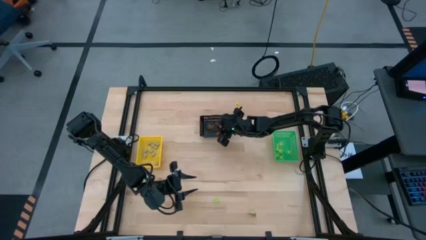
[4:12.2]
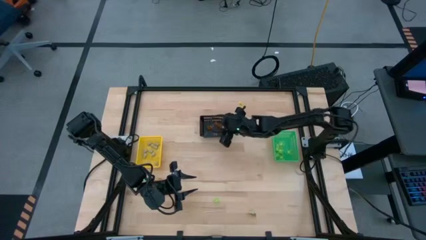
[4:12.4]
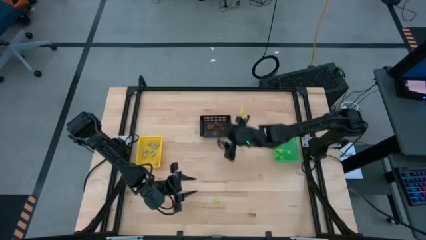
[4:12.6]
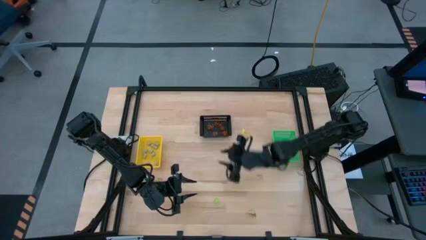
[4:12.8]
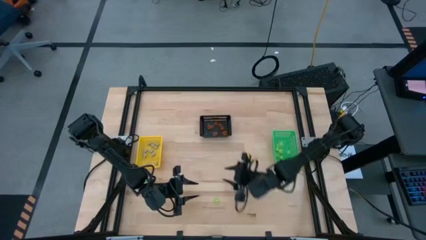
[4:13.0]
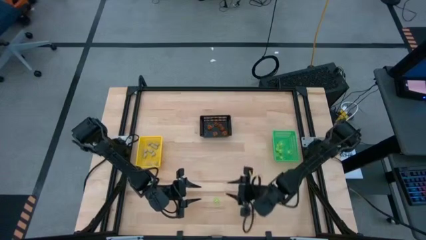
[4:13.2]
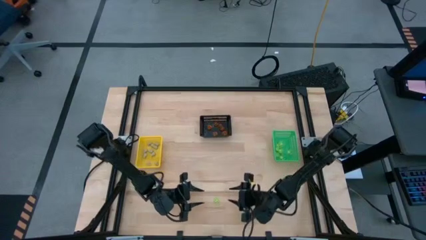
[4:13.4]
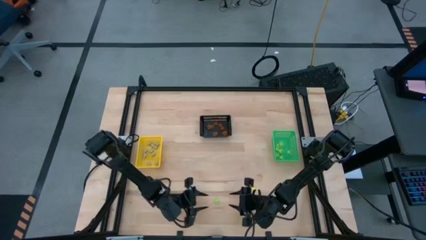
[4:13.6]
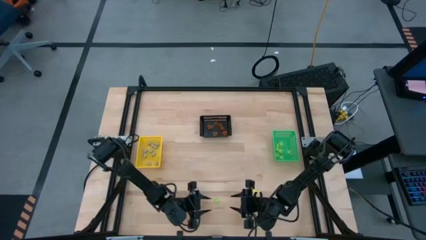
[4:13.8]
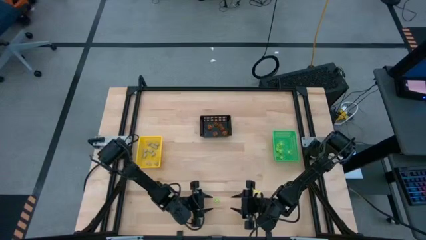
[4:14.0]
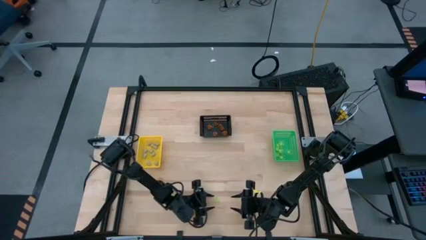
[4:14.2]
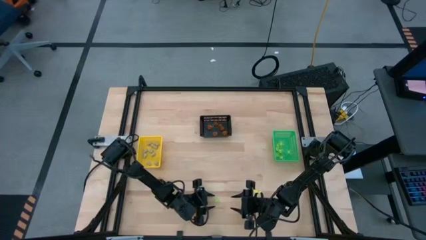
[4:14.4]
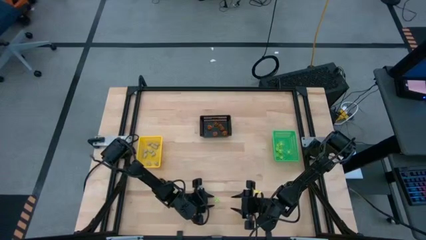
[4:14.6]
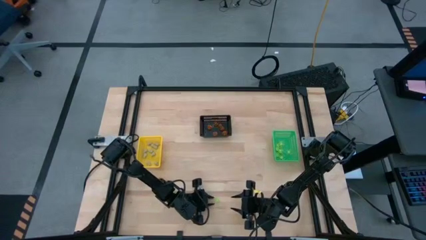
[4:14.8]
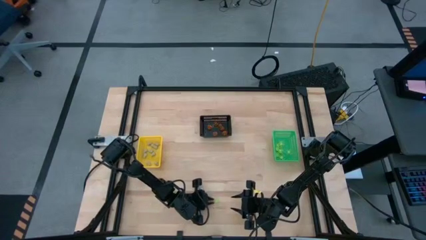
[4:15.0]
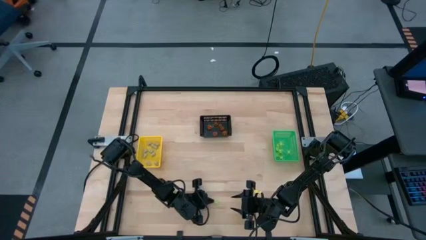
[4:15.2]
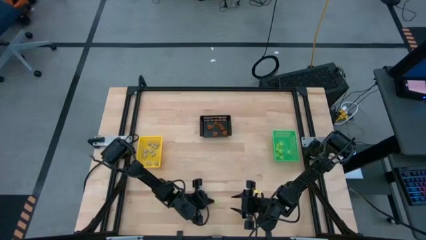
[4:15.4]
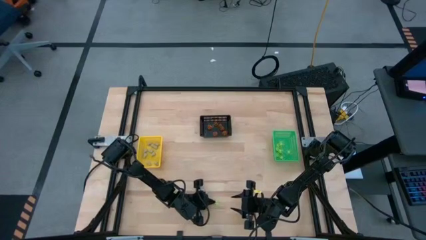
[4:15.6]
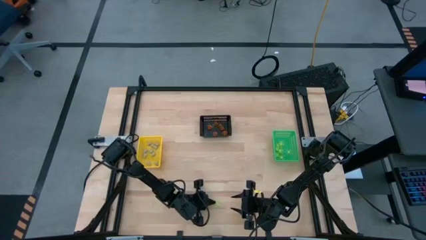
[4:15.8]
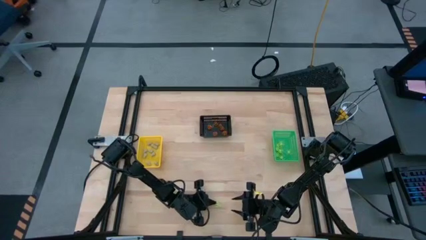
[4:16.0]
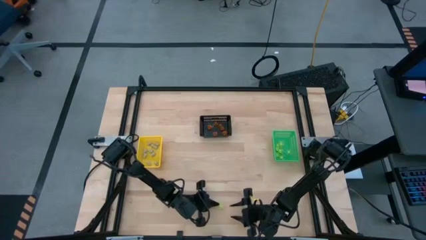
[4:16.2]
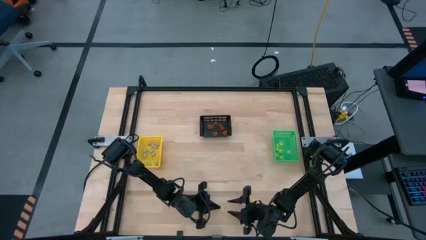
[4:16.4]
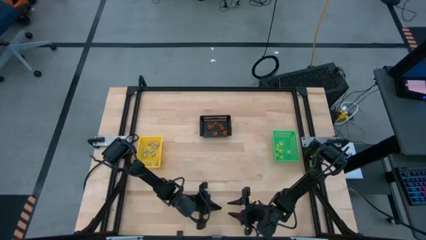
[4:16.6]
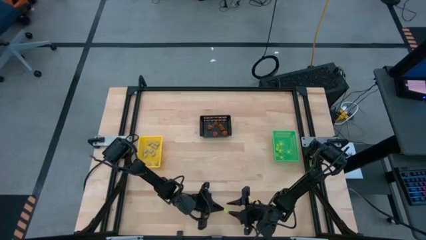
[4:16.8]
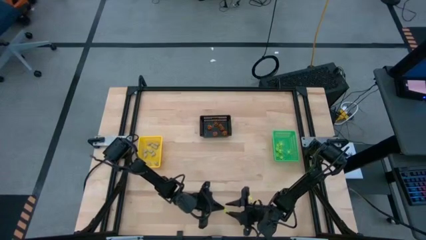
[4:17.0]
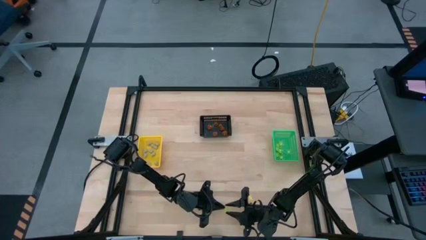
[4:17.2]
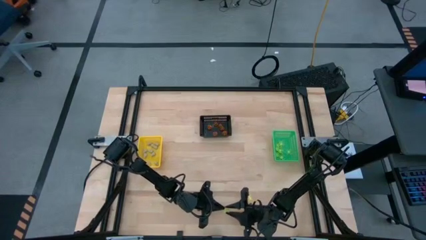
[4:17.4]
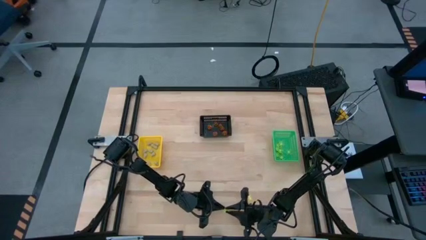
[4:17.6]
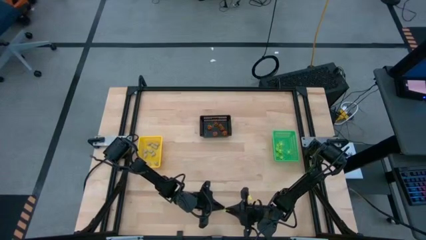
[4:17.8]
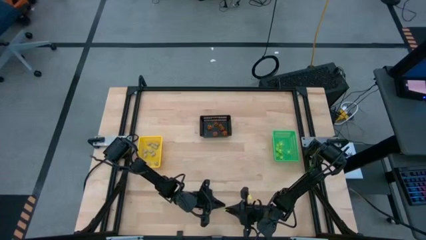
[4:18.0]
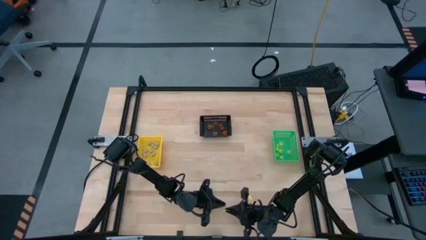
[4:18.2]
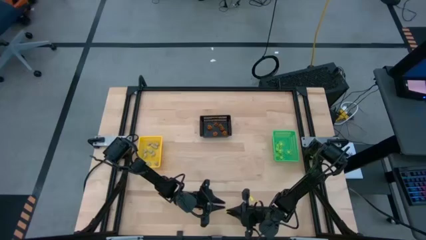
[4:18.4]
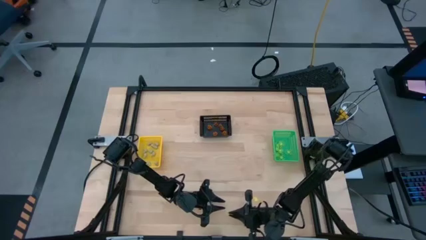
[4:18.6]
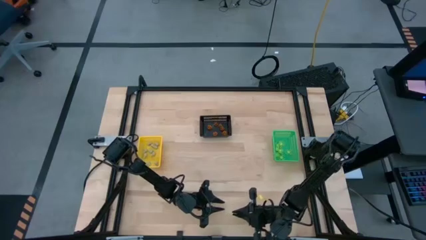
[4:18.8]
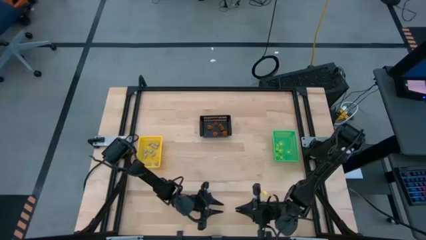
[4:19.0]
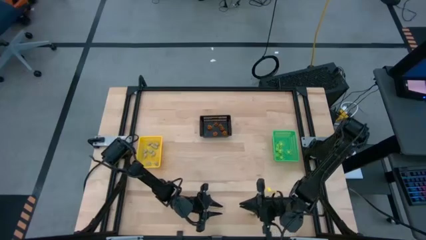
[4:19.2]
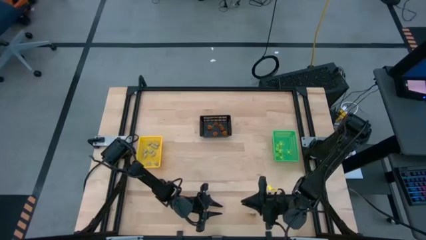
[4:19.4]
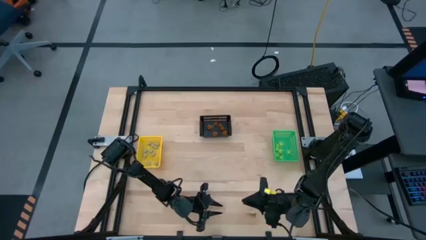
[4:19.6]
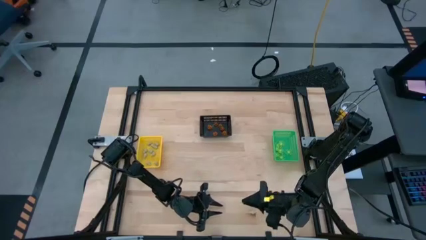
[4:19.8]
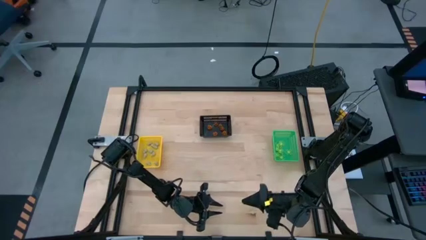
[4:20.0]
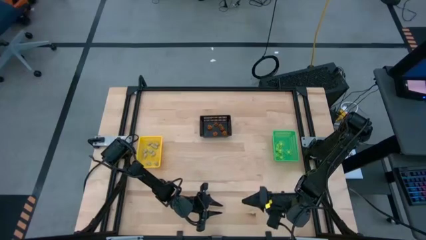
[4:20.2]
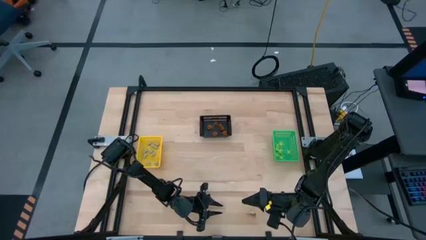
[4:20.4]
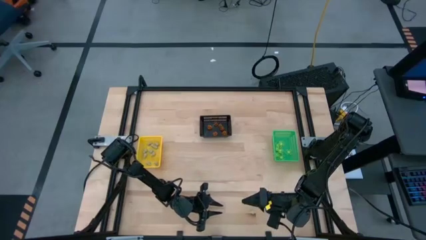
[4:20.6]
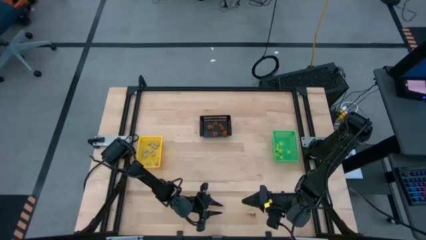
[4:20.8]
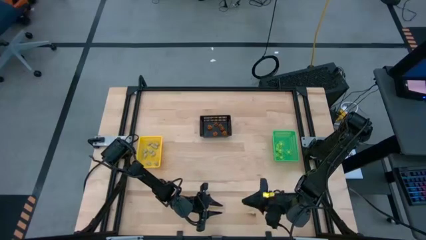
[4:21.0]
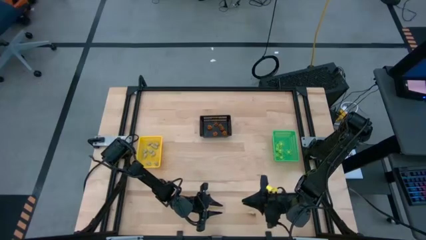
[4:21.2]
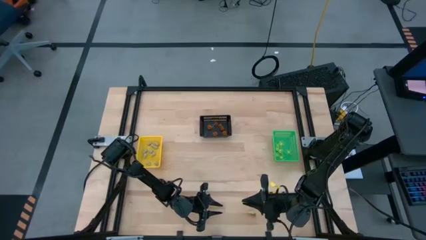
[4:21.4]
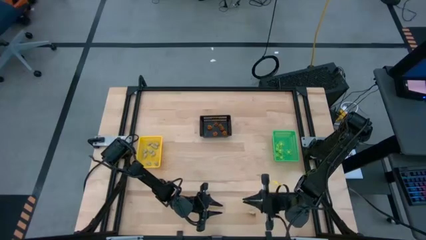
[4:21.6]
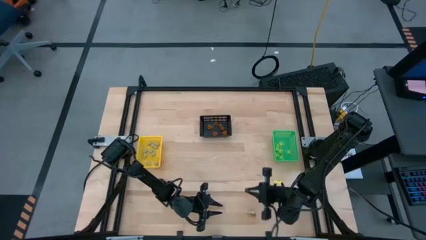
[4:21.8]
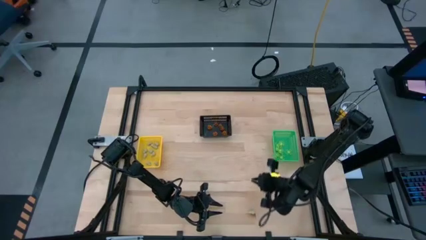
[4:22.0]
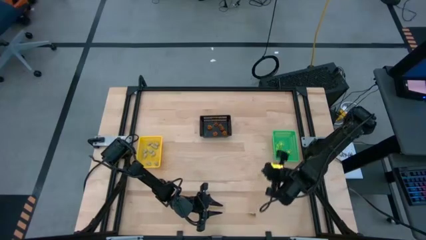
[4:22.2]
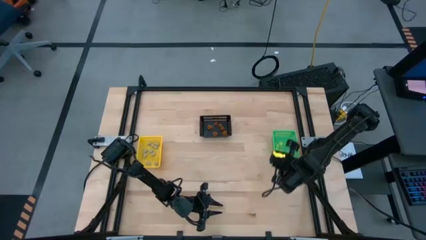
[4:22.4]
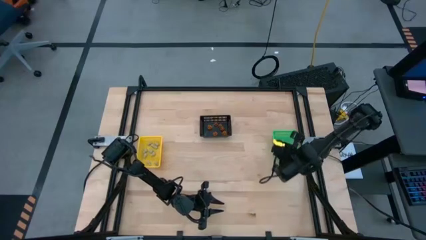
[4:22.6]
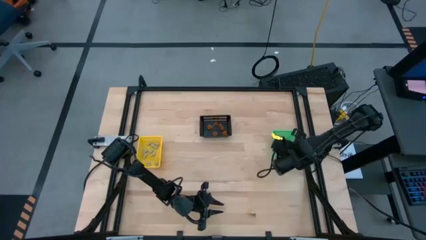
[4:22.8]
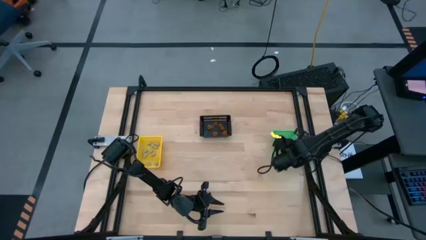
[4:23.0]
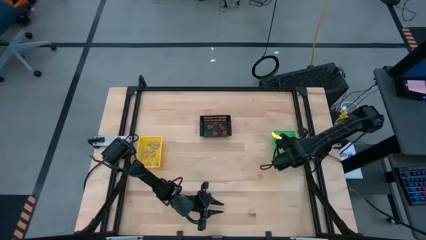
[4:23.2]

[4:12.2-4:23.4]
Task: Sort Halloween decoration
Put the green spider toy into the green bin

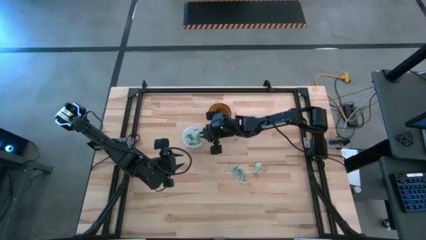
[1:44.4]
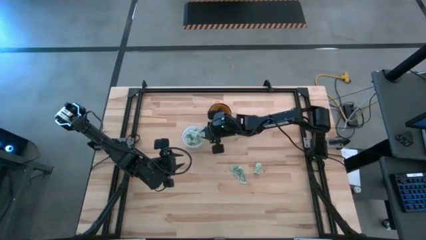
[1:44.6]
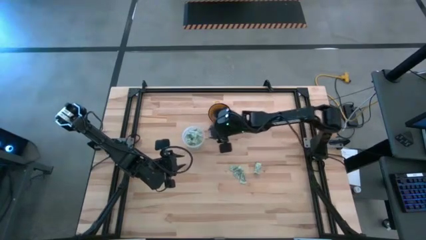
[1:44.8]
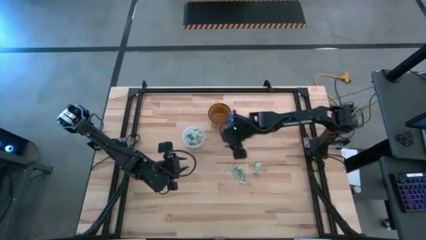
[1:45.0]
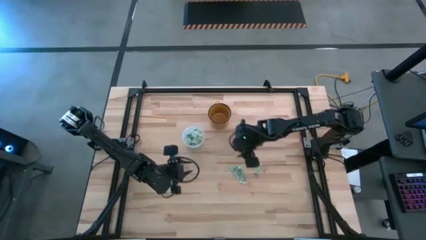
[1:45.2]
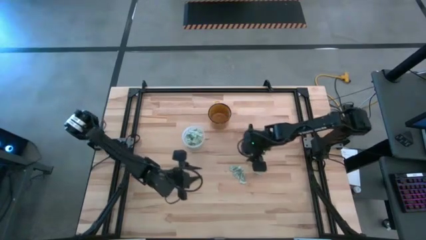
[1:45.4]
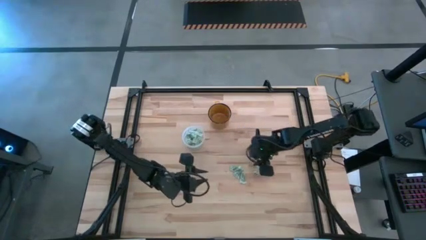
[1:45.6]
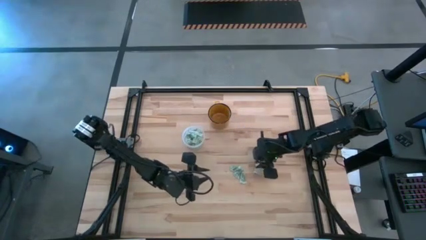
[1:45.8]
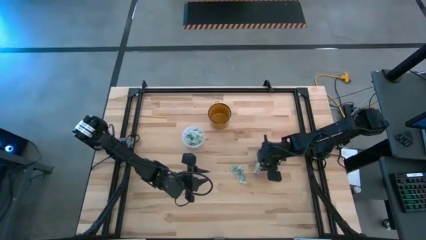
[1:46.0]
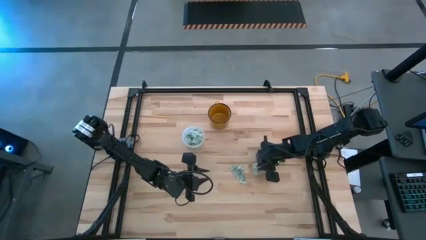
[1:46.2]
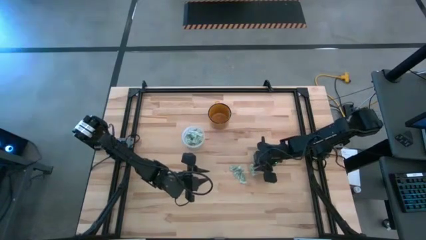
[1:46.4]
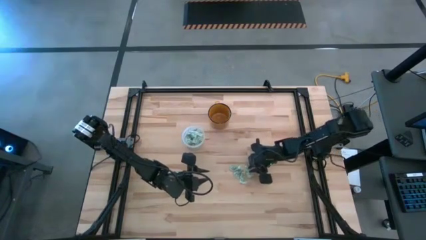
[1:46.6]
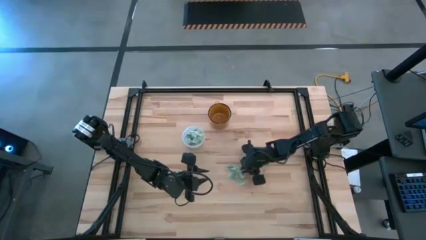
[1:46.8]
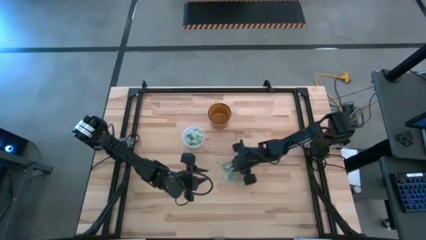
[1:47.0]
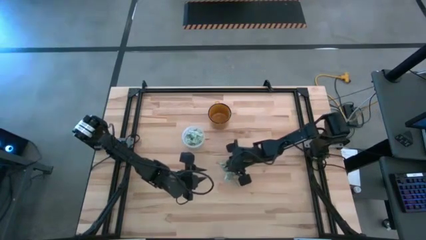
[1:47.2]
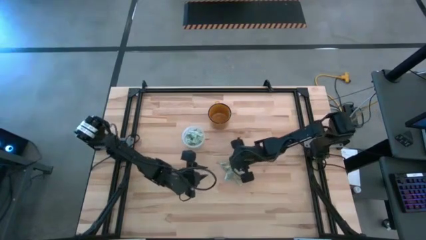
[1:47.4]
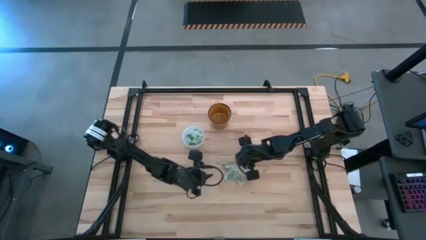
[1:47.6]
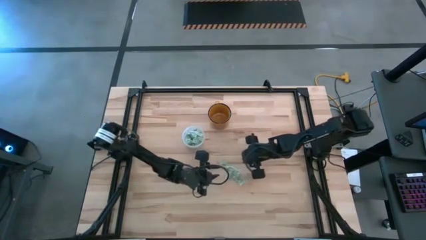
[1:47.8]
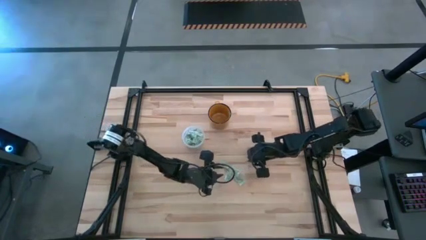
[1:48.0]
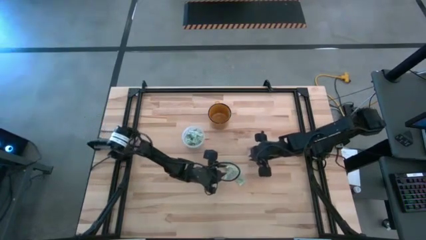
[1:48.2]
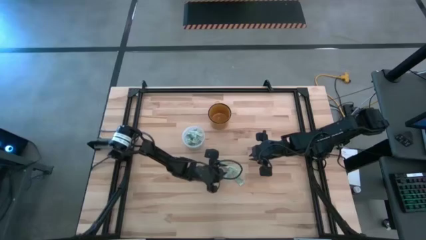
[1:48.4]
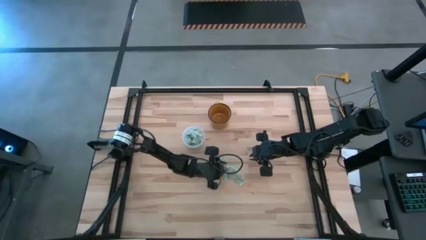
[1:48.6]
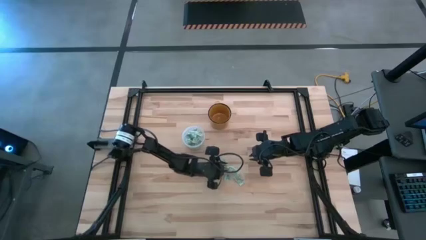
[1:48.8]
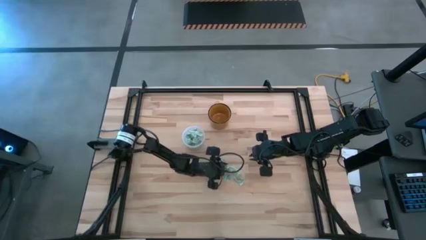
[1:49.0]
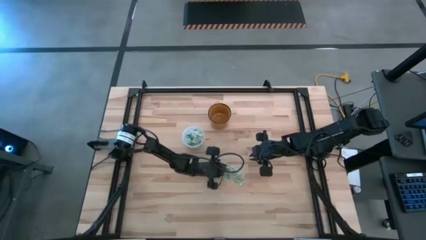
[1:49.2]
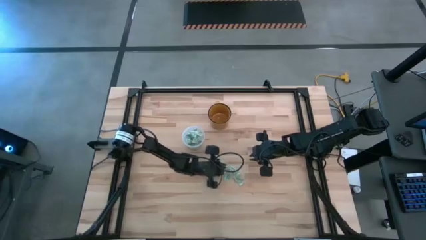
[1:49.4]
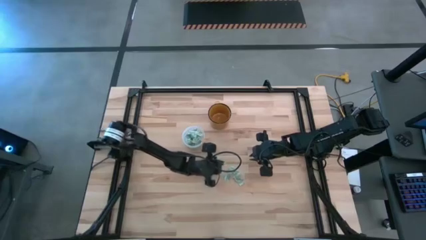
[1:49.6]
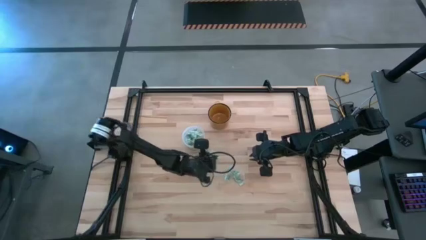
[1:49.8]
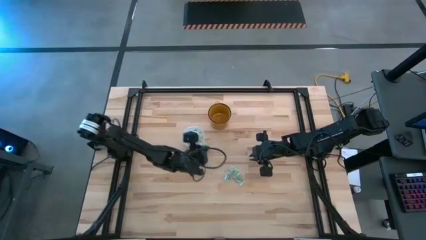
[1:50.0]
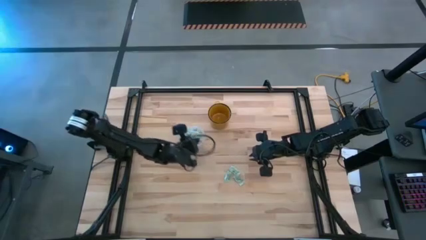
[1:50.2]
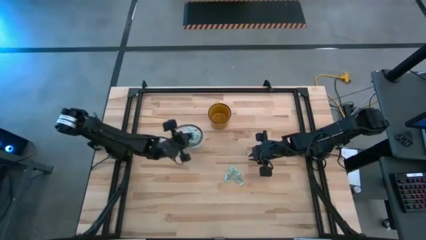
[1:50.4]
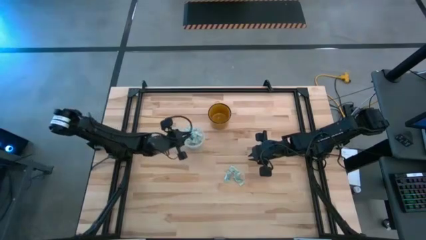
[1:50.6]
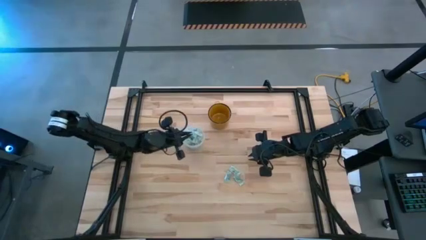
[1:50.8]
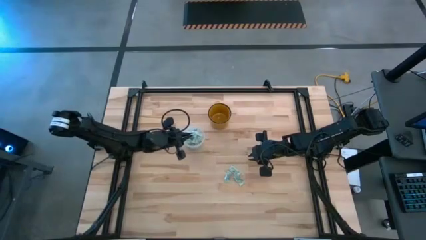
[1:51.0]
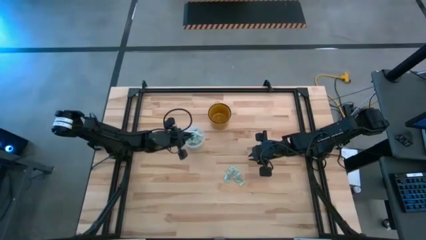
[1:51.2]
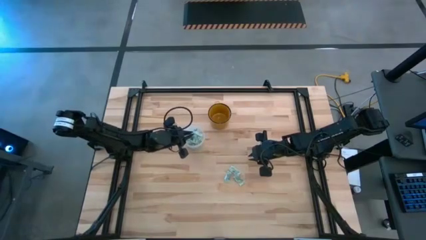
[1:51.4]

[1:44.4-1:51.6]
Task: Pick and place Stevia / Truvia into bins
Put the stevia packet into the transparent bin
